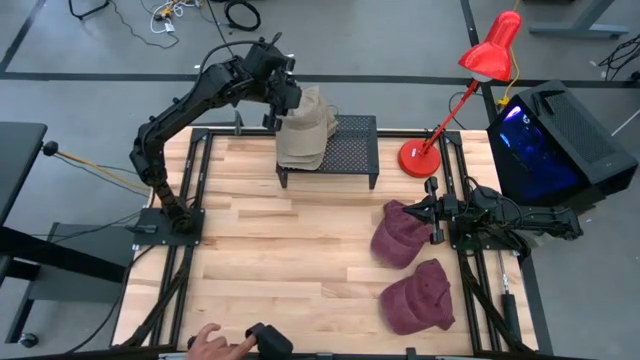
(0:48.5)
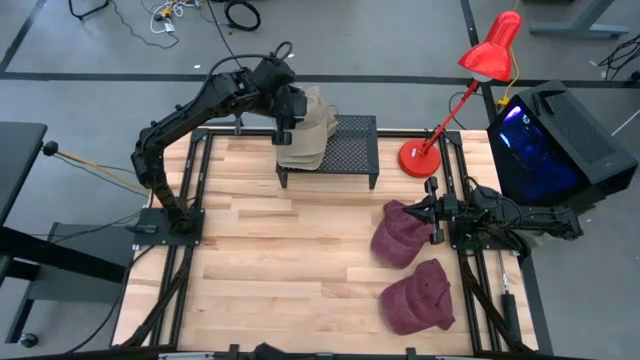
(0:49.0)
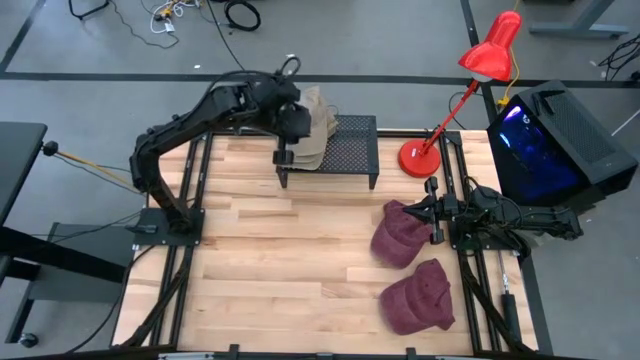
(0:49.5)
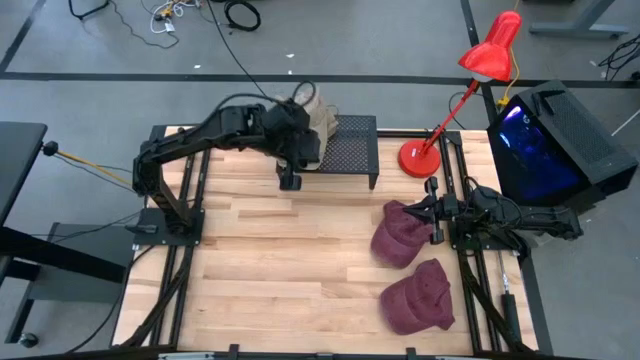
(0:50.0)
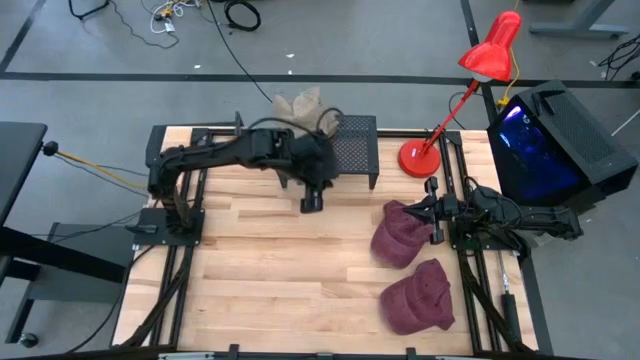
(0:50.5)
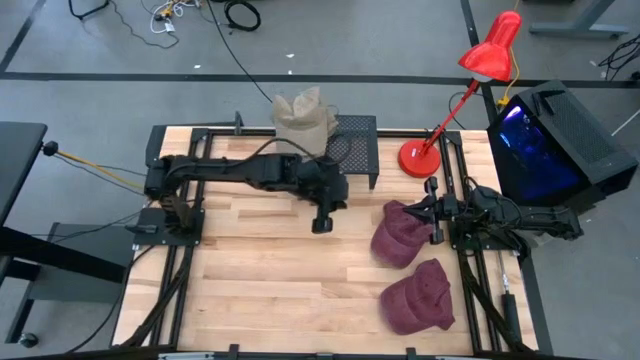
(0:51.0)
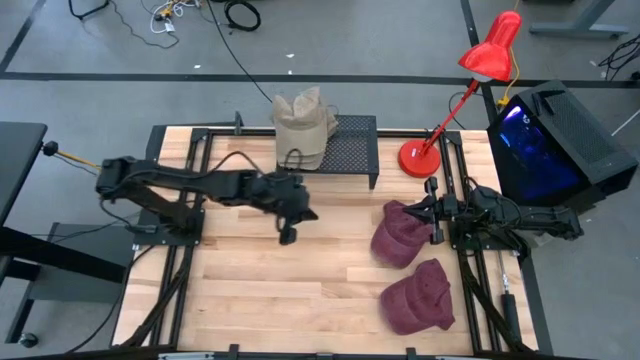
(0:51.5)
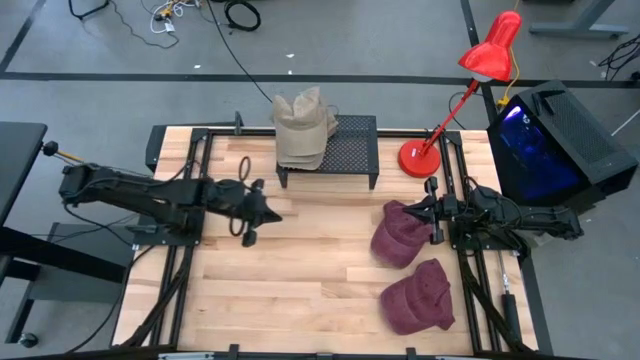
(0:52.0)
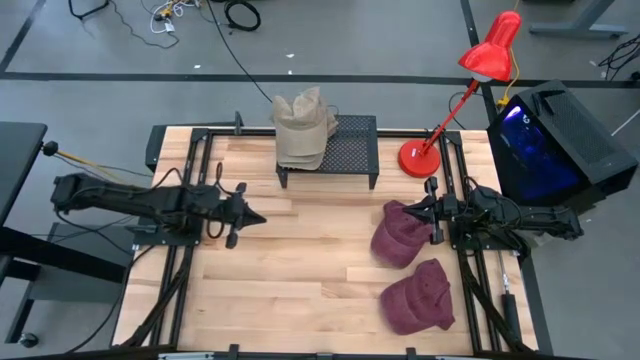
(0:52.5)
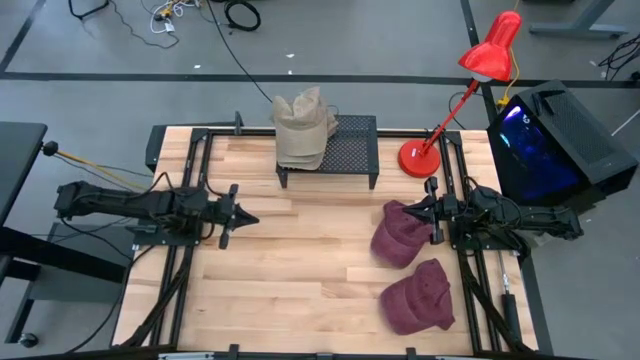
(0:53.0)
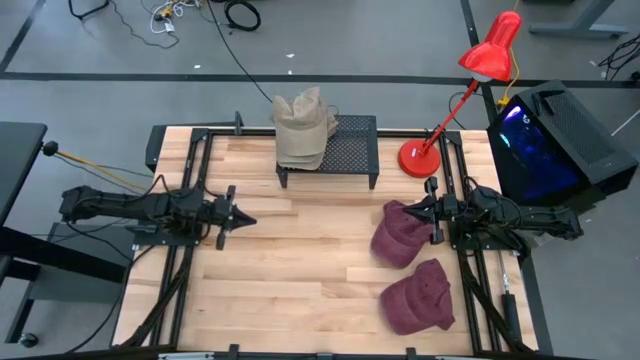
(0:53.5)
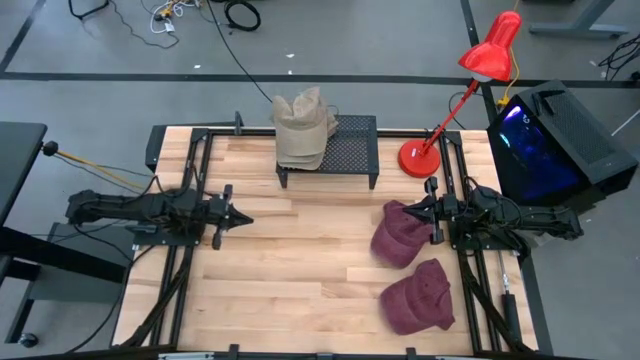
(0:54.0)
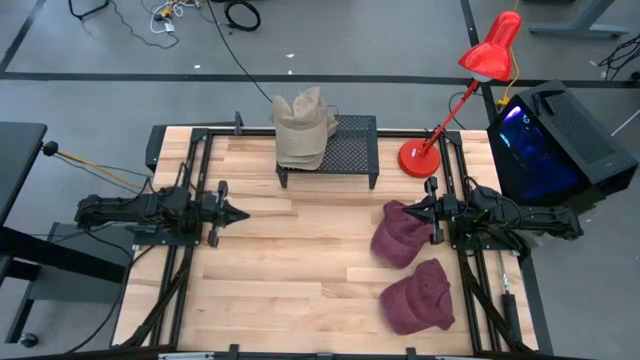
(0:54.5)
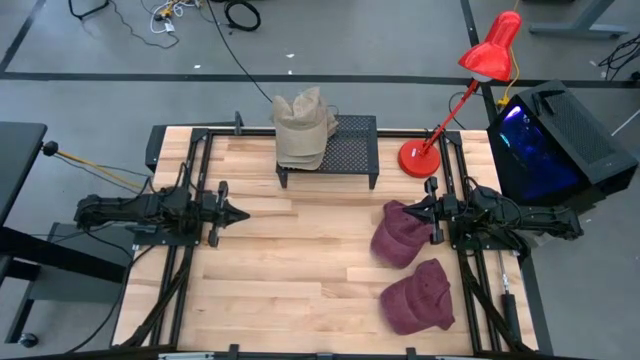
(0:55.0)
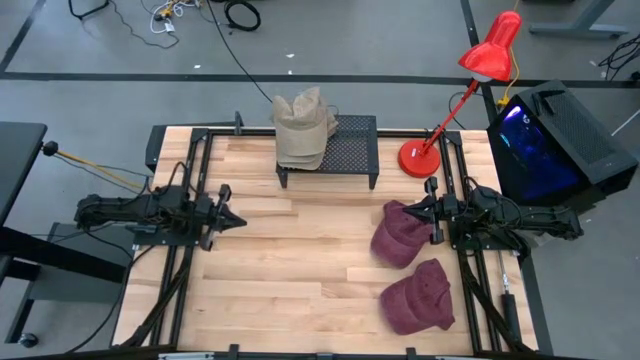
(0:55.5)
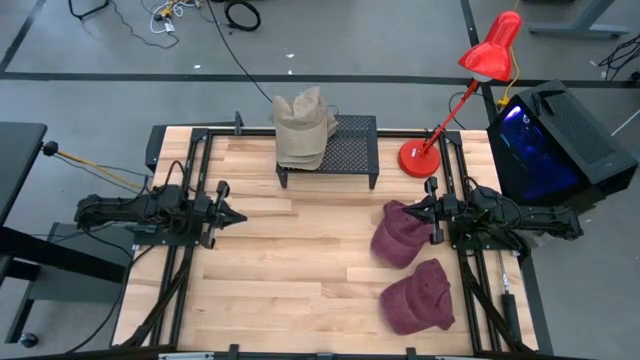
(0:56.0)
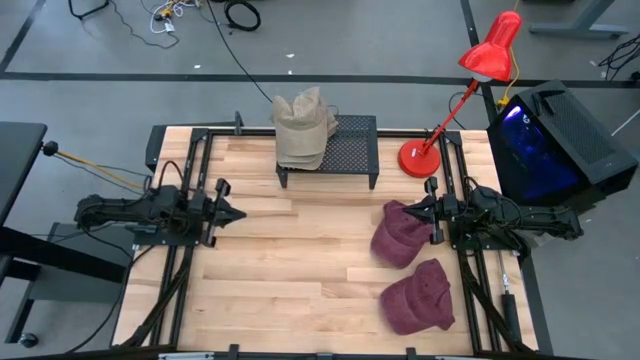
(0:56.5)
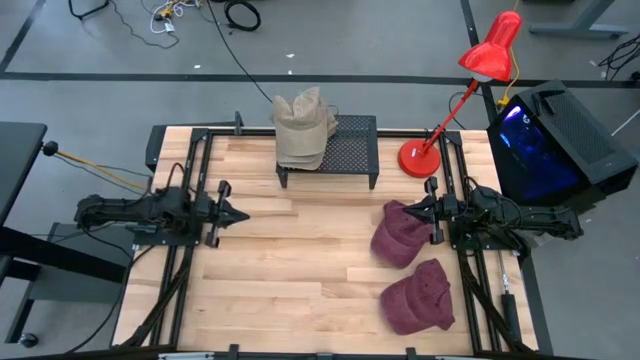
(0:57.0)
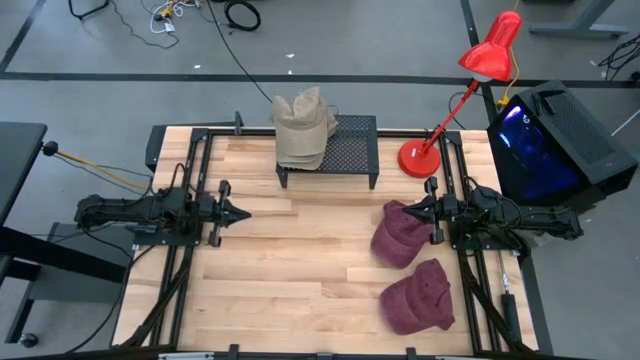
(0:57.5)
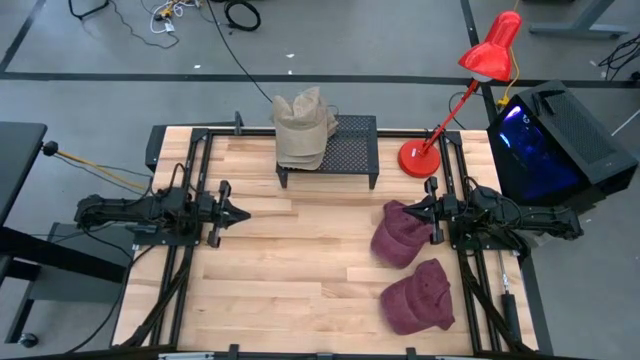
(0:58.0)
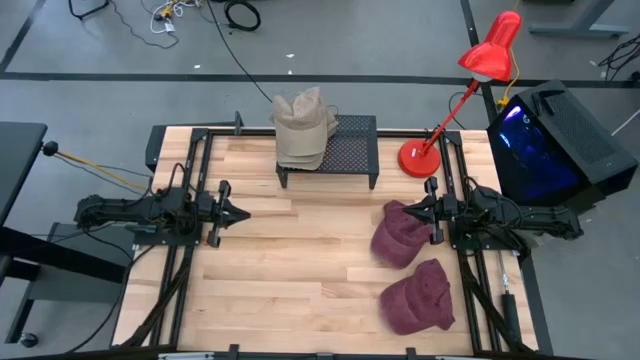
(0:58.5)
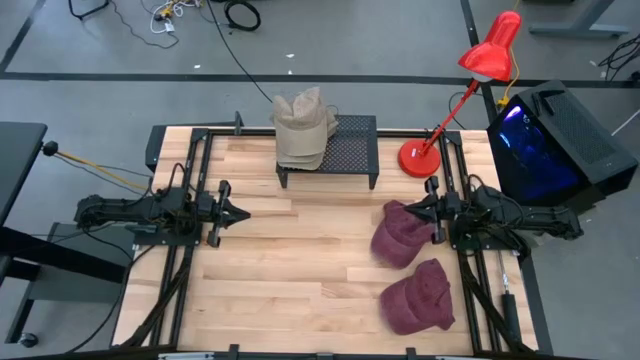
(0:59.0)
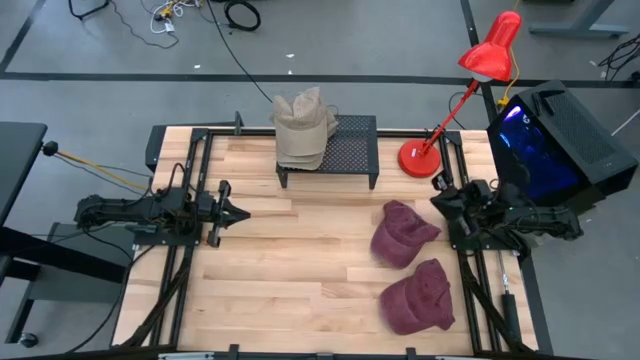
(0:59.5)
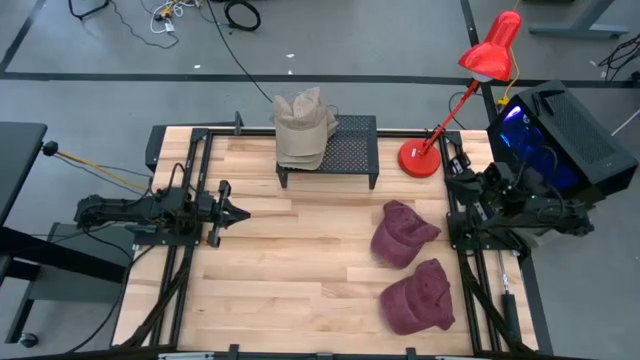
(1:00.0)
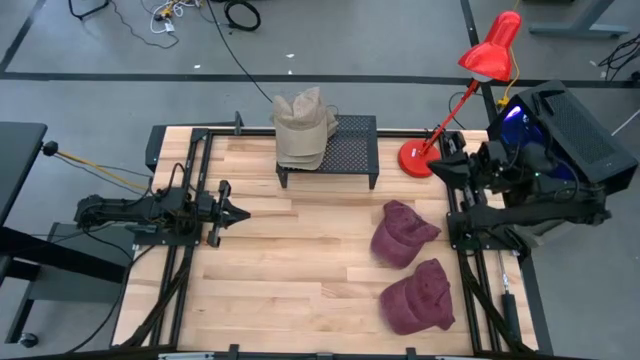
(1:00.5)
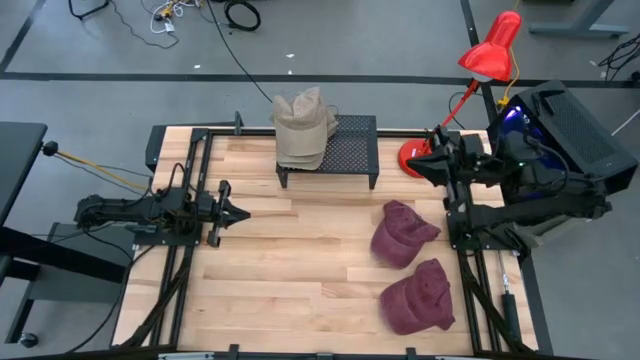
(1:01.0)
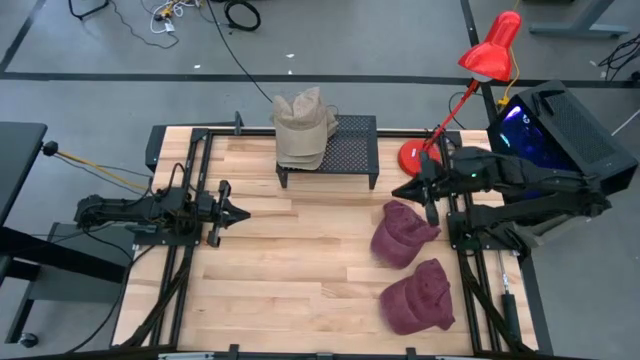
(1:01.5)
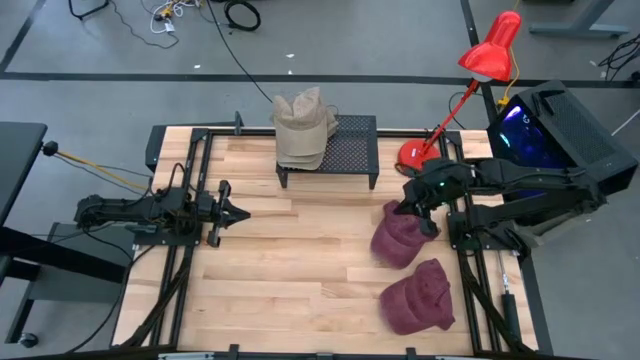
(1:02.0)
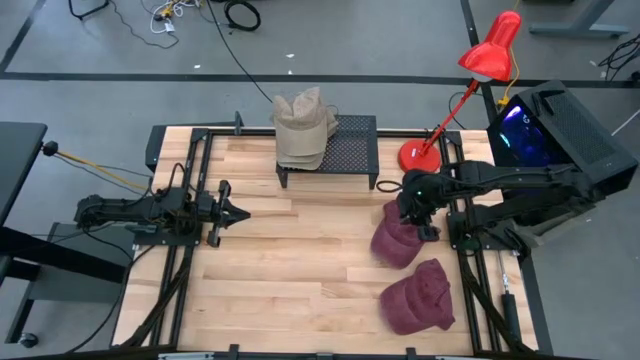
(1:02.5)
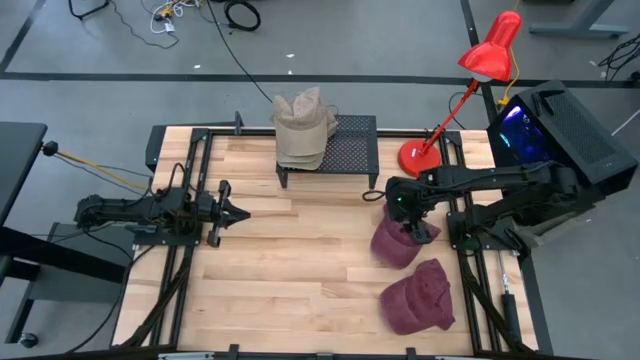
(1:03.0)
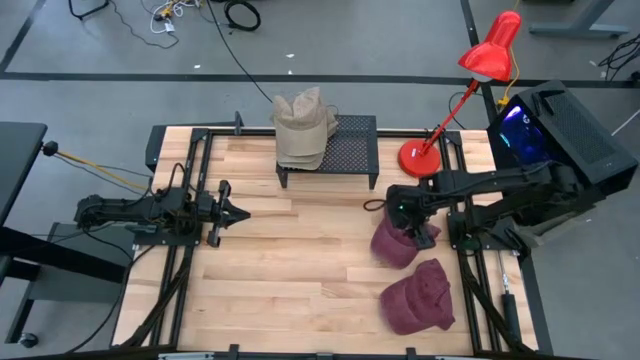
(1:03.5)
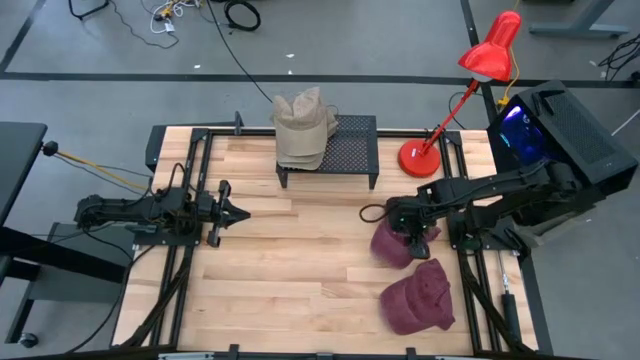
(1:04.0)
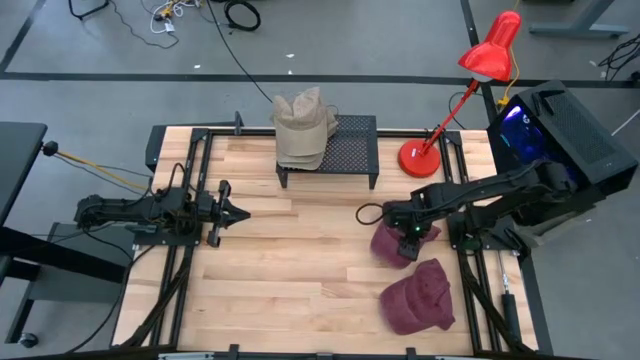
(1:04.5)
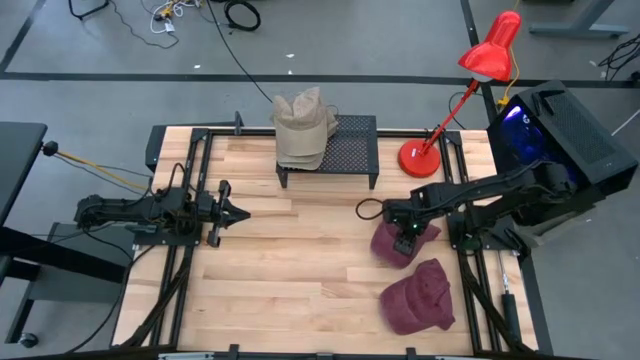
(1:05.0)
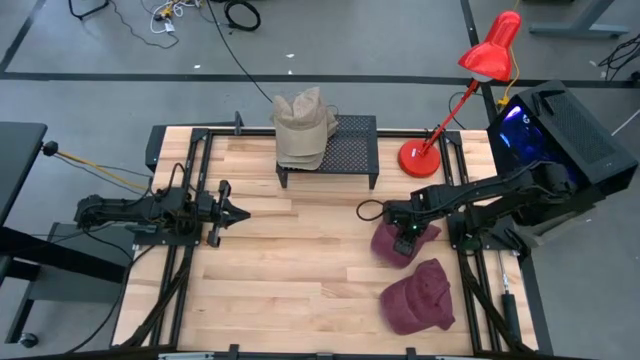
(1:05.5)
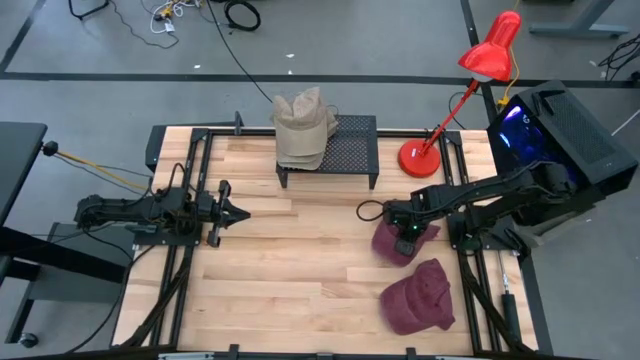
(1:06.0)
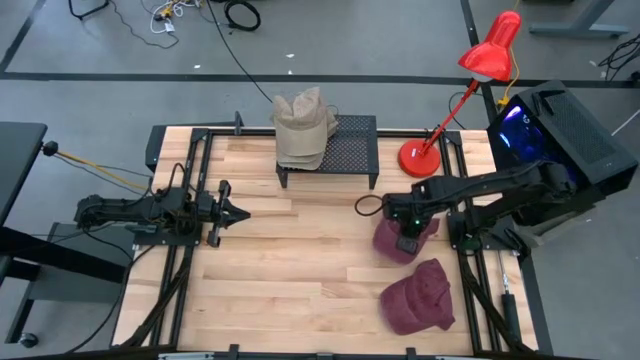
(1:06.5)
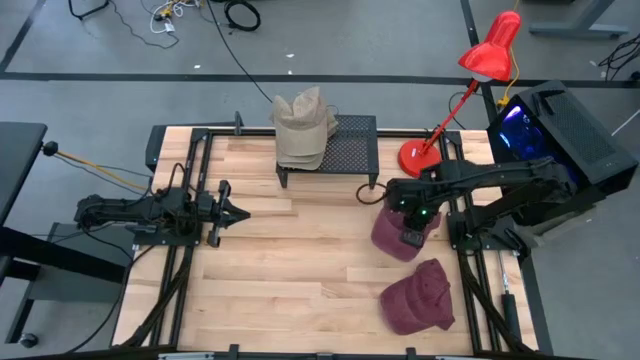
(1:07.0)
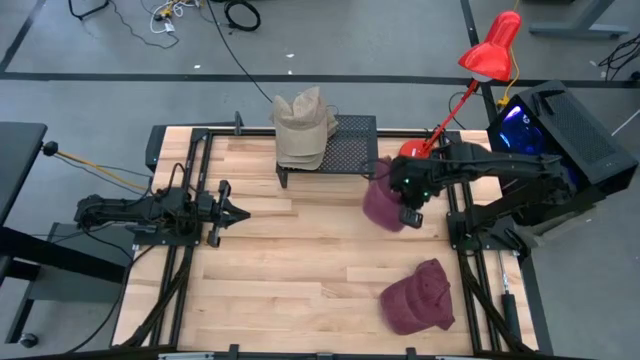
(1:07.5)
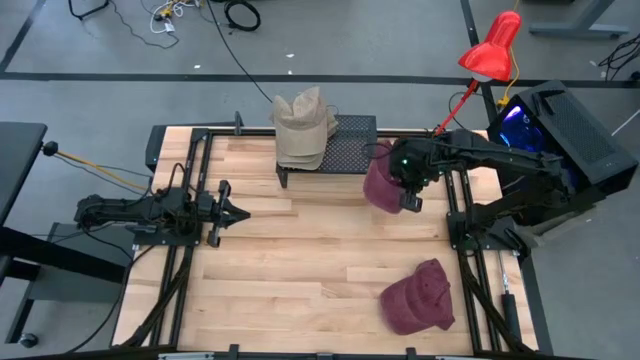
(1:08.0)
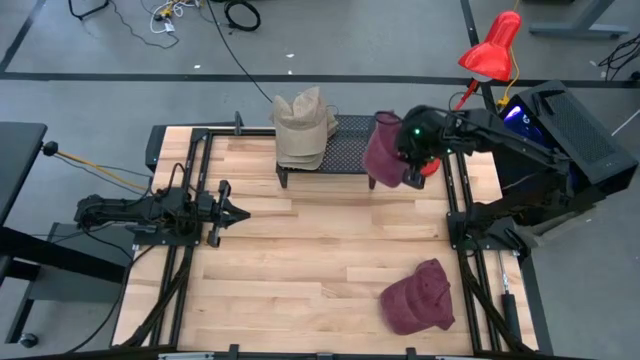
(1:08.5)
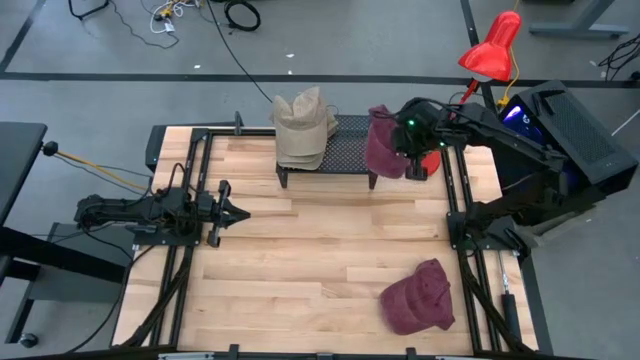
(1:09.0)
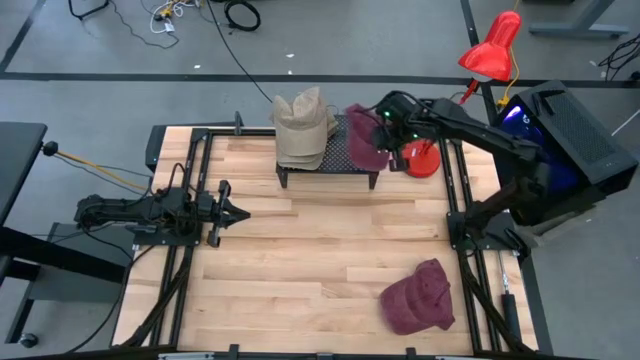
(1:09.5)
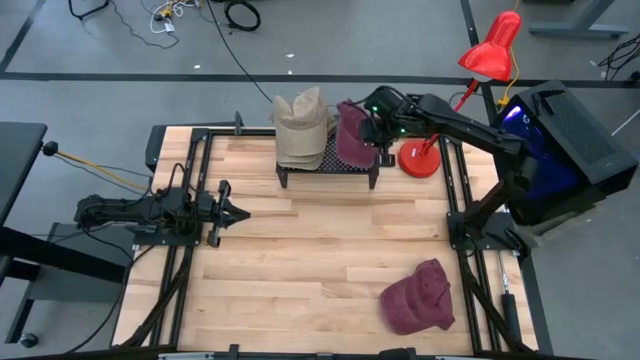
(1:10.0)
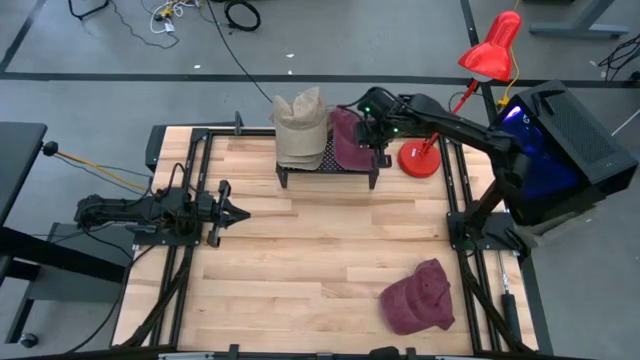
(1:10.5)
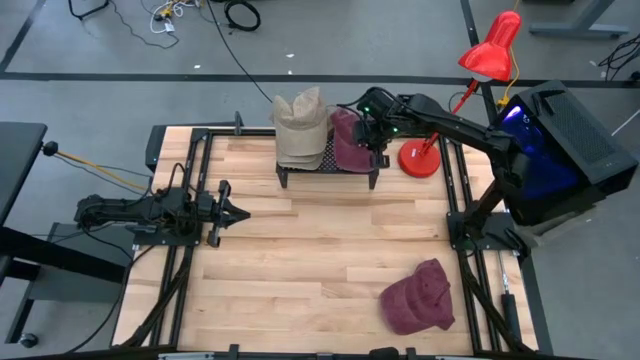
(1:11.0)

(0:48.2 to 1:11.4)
Task: Pick & Place hat
Put the top red cap on the shelf
